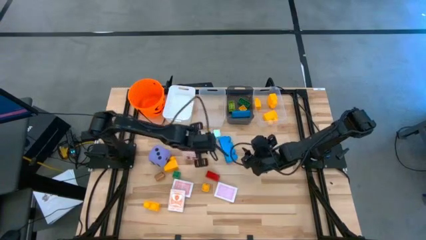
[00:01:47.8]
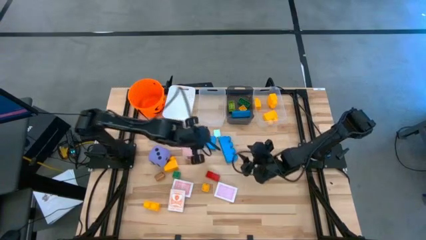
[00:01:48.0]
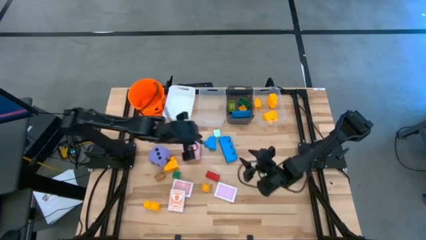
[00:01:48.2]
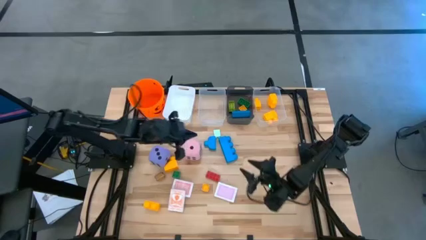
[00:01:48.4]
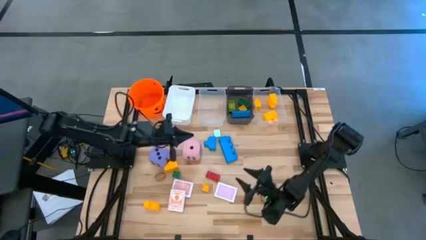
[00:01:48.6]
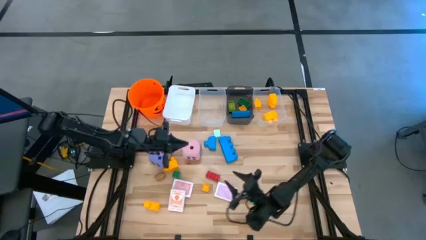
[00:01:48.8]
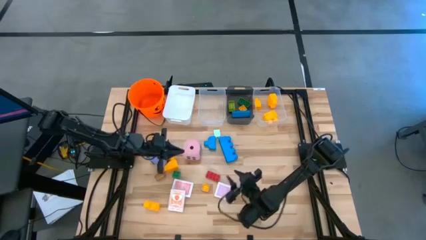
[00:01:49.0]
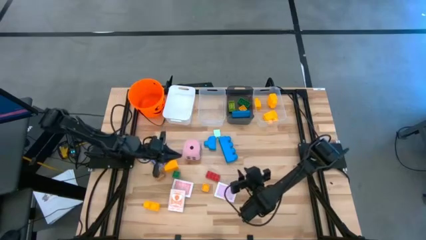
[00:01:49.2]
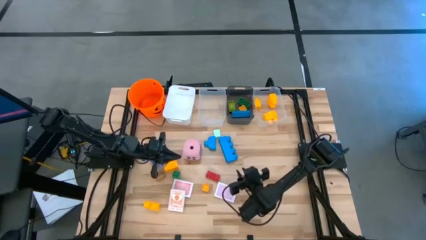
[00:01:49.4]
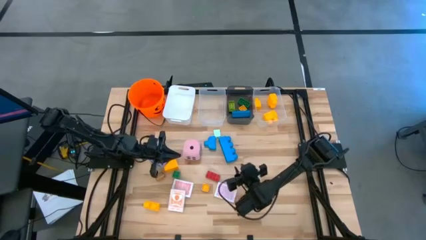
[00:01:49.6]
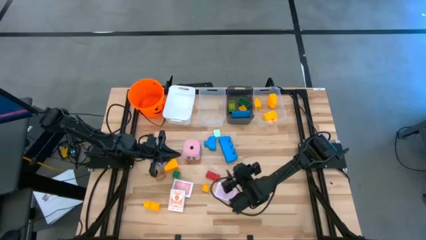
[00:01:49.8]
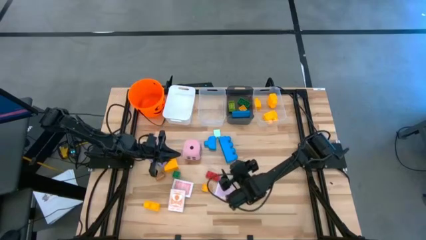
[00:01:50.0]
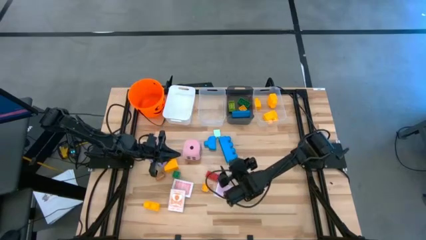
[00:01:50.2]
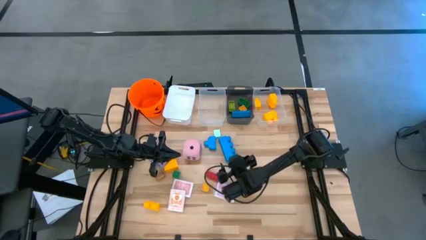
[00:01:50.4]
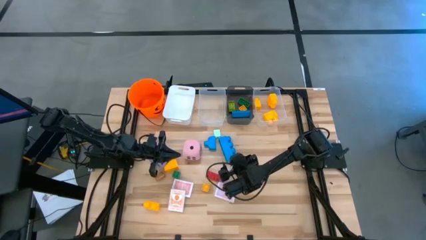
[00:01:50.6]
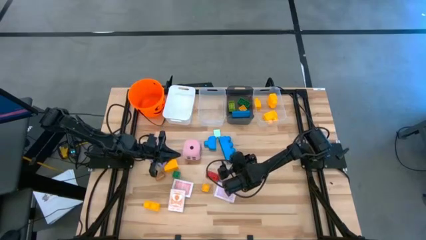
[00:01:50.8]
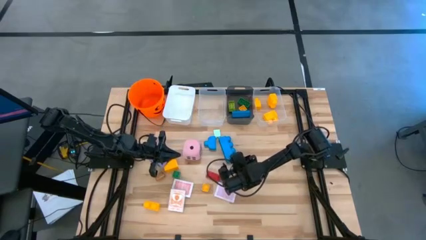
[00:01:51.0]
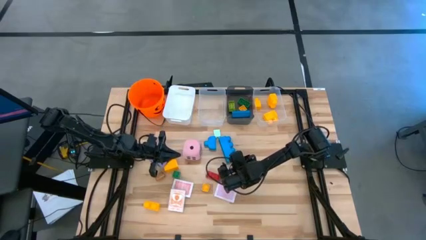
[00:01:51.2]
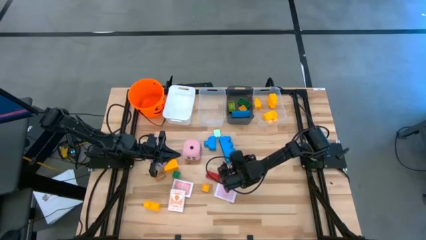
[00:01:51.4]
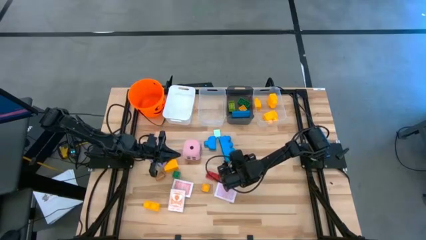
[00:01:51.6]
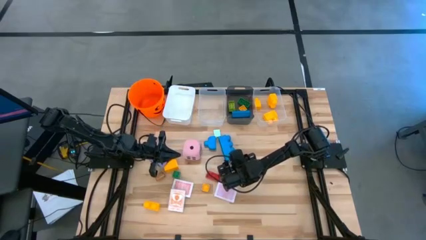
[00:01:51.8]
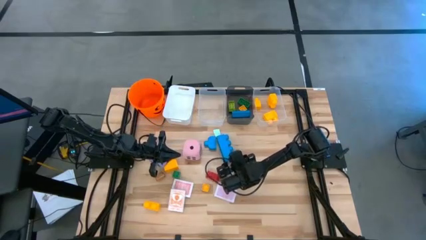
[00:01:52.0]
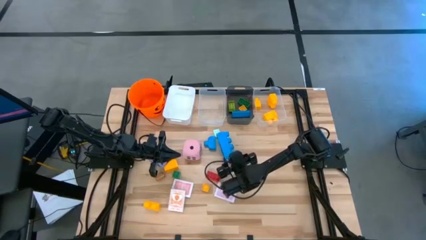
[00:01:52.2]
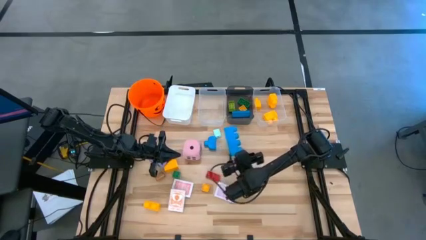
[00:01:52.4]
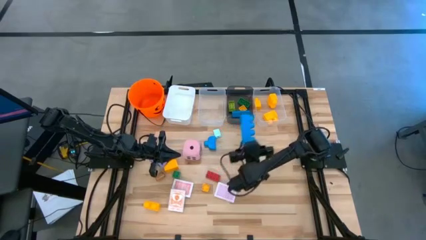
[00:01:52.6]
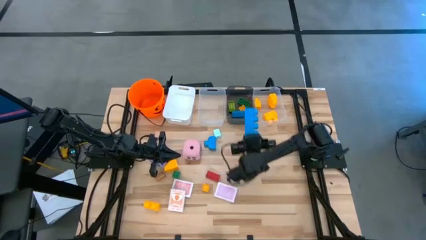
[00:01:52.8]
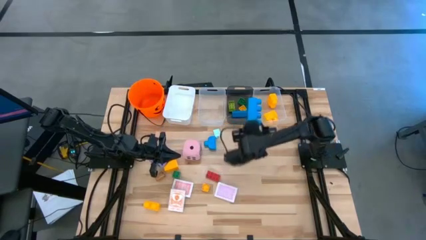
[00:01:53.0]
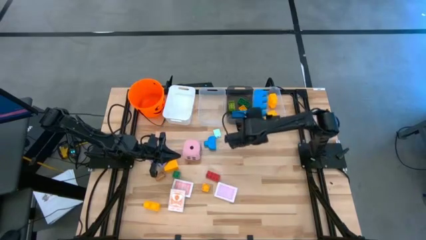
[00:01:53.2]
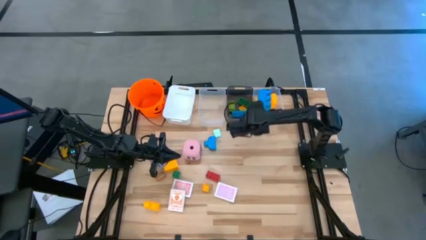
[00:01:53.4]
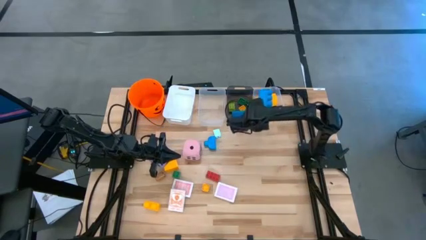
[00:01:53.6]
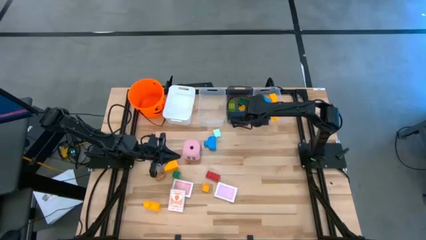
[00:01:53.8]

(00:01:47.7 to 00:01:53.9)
Task: Pick & Place Toys
Put the big blue game piece into the right transparent bin

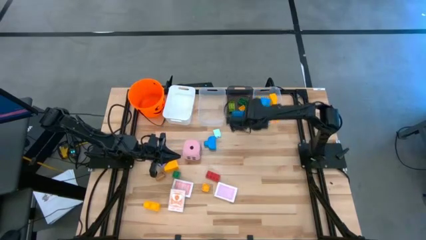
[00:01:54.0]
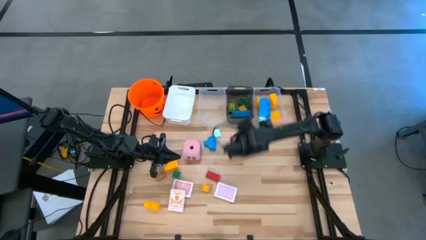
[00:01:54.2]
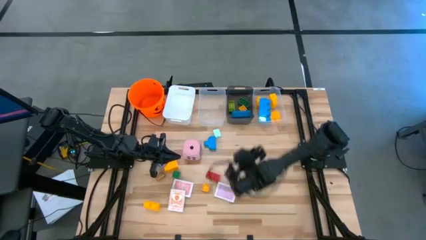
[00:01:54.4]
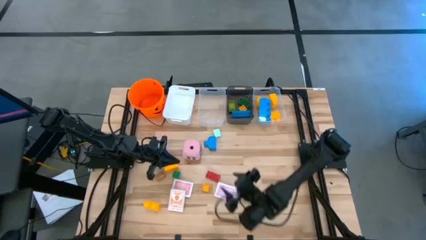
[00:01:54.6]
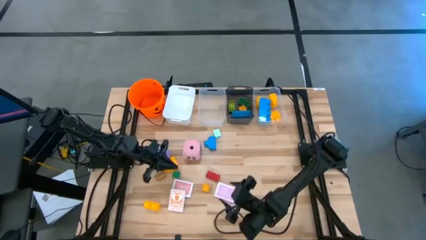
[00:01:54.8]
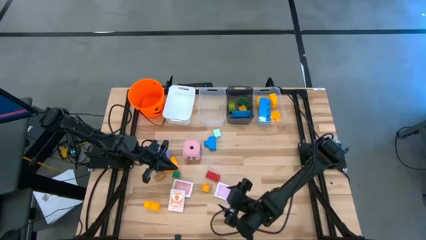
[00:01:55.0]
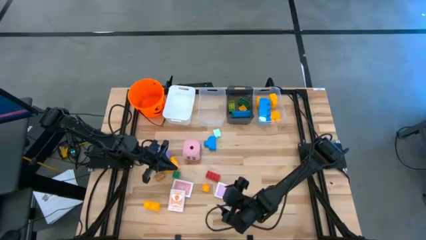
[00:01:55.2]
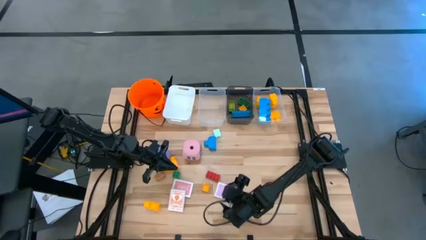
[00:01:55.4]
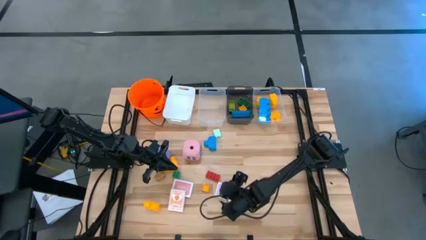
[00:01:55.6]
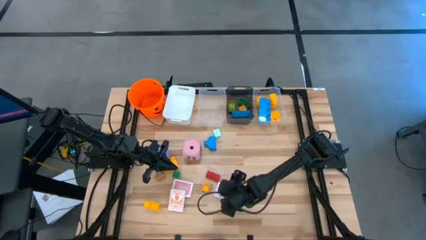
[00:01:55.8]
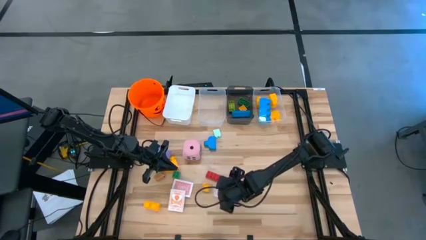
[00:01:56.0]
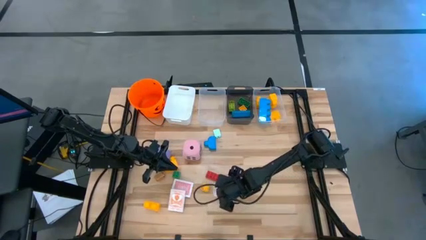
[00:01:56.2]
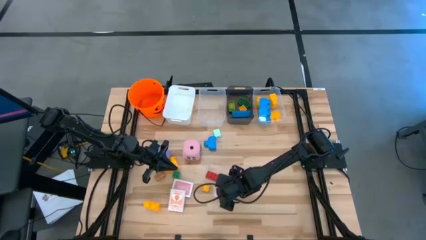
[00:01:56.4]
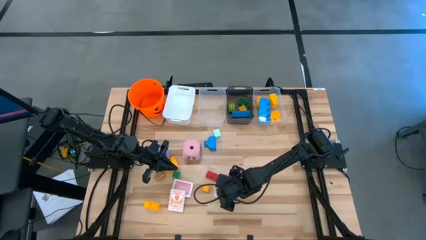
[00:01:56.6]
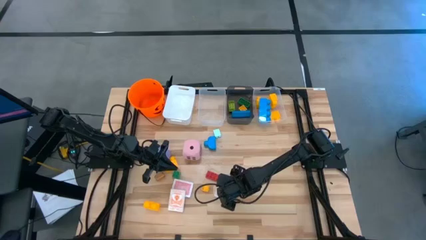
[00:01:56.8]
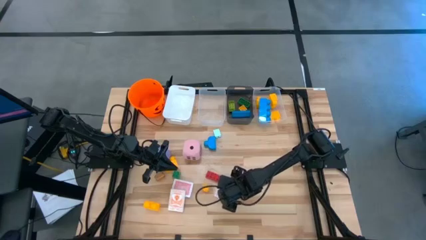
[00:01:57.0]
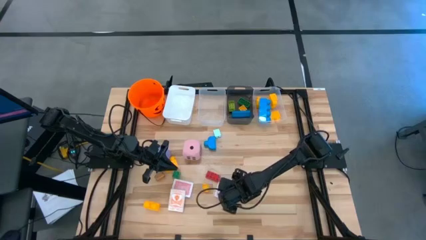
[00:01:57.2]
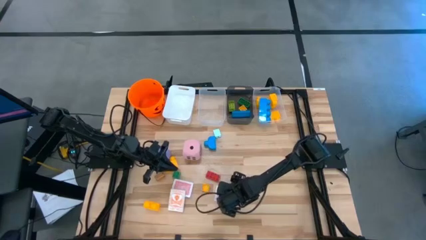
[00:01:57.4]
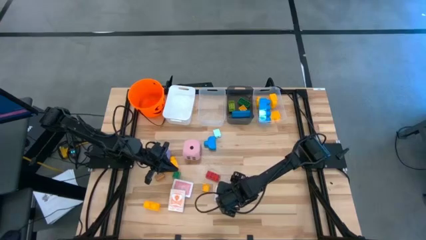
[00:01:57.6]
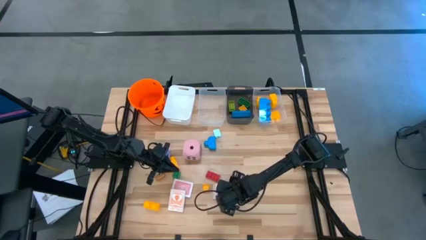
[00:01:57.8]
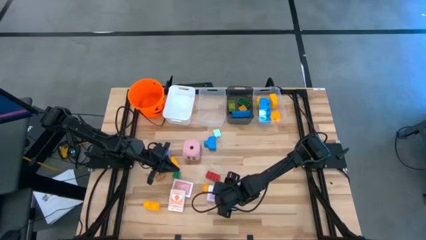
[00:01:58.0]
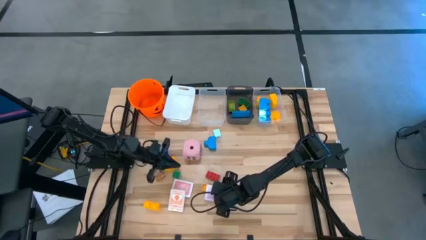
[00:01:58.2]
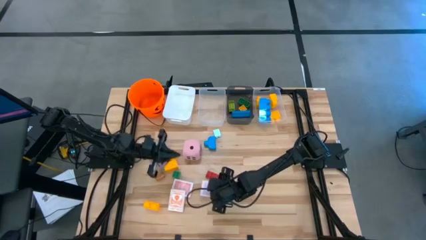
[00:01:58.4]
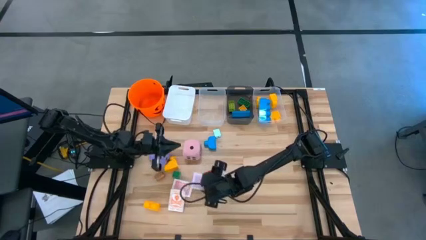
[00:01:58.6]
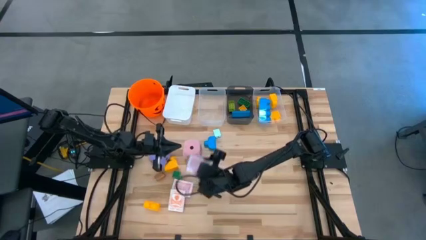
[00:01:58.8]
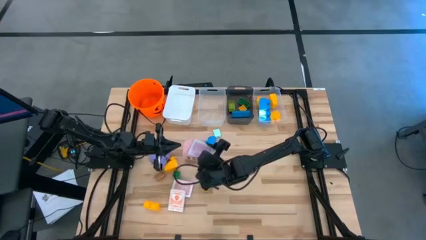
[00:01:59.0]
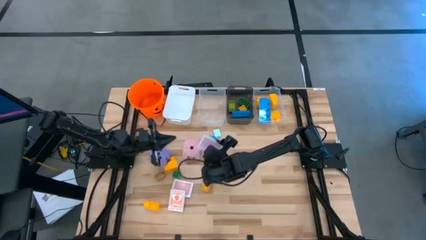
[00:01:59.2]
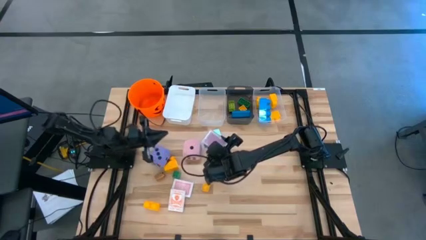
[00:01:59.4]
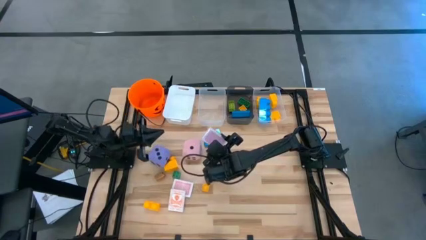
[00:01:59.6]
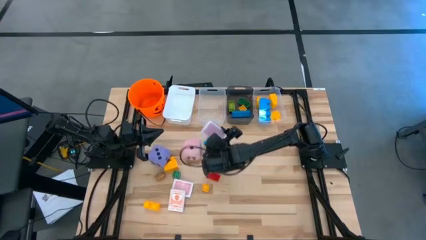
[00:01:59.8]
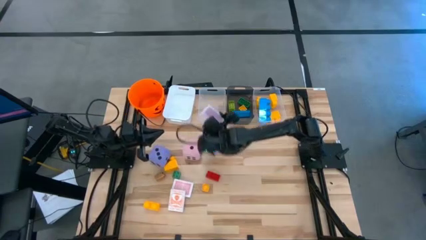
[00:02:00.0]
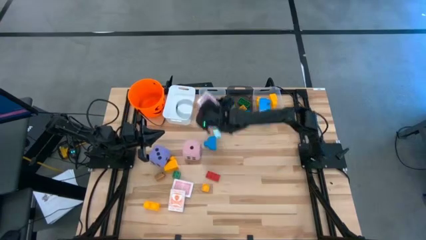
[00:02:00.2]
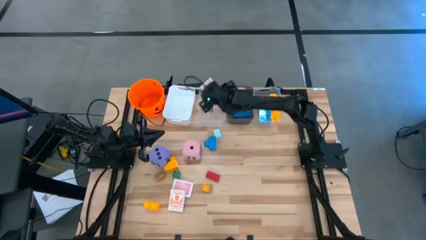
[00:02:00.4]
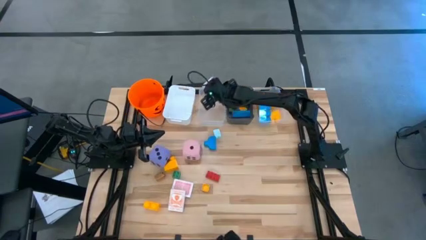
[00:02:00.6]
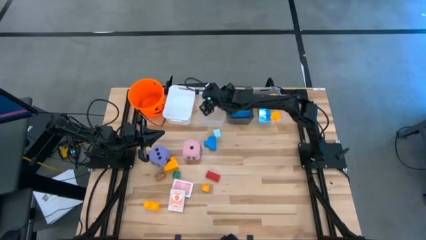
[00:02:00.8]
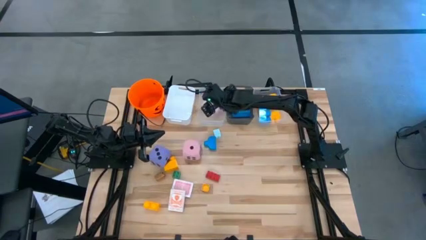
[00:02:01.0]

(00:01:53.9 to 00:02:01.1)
Put the pink game card into the left transparent bin
